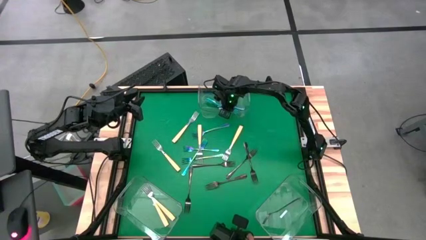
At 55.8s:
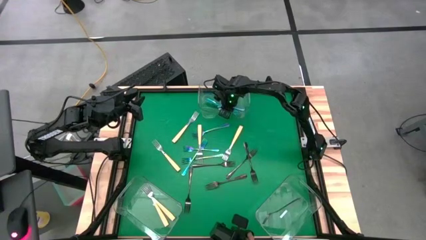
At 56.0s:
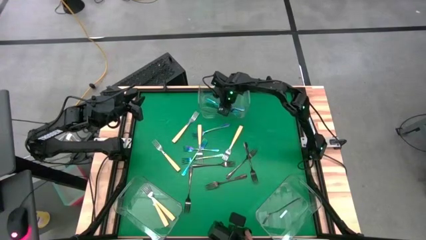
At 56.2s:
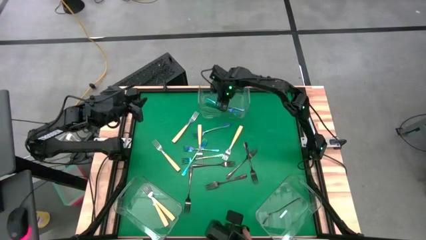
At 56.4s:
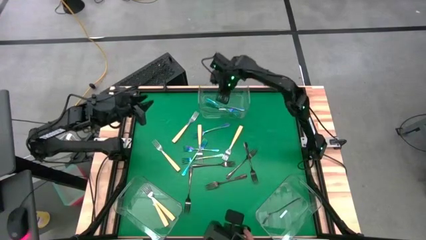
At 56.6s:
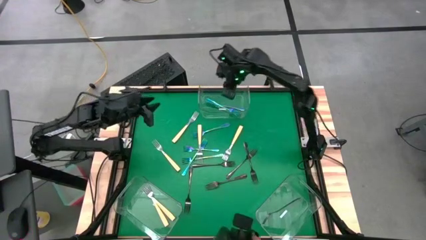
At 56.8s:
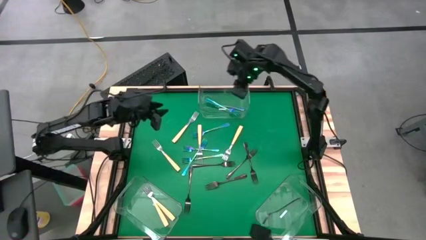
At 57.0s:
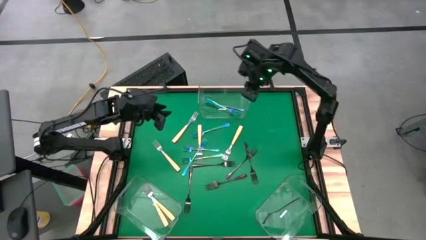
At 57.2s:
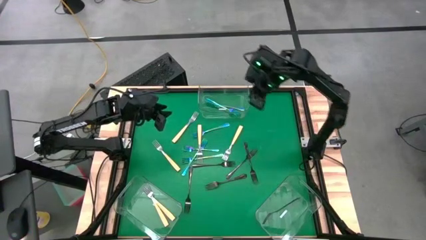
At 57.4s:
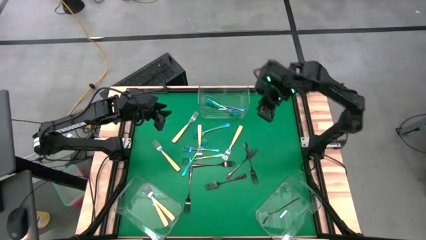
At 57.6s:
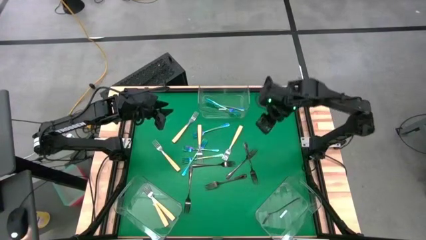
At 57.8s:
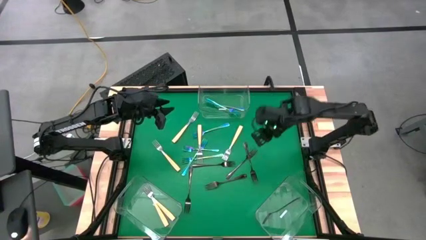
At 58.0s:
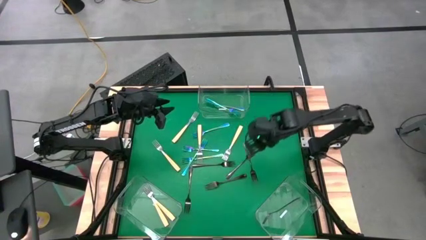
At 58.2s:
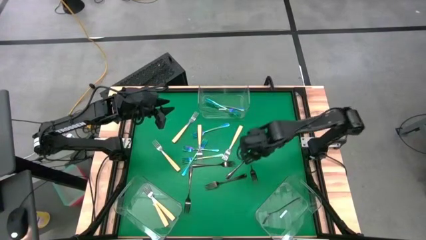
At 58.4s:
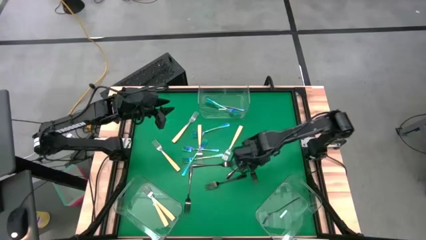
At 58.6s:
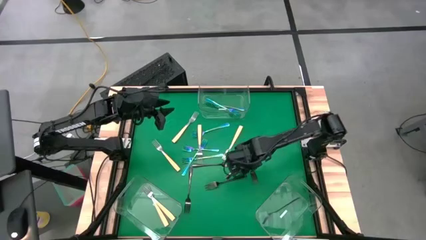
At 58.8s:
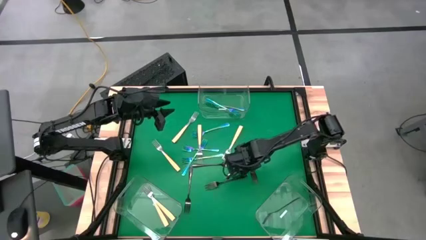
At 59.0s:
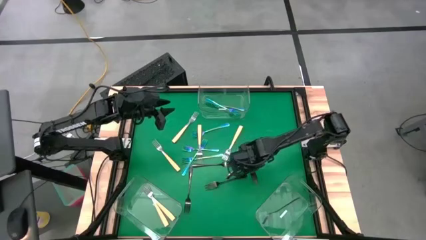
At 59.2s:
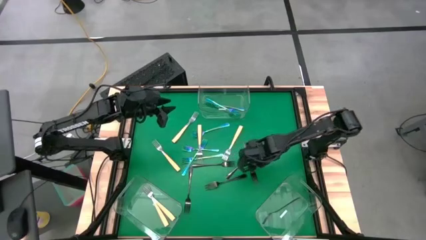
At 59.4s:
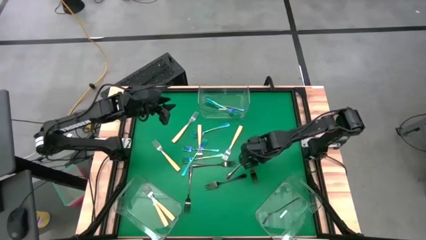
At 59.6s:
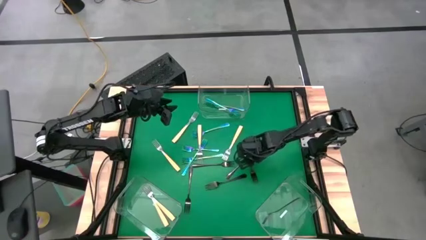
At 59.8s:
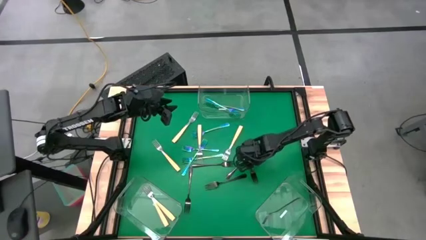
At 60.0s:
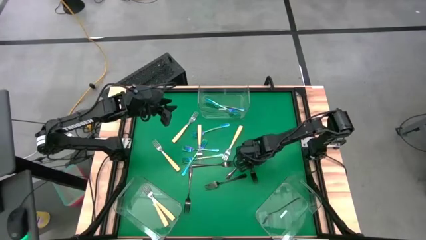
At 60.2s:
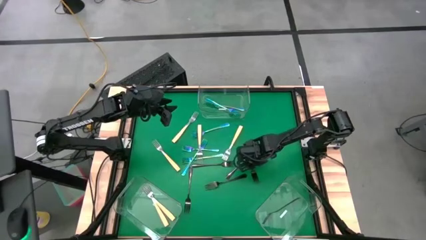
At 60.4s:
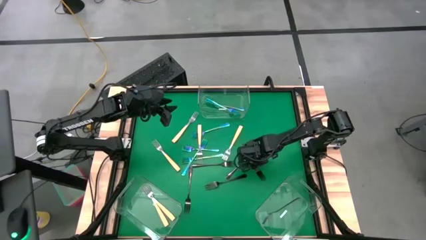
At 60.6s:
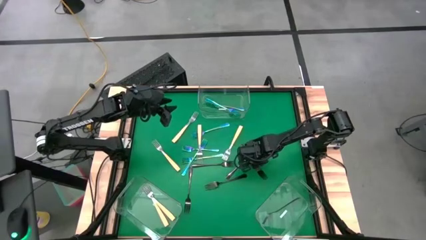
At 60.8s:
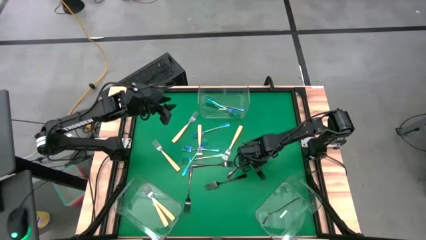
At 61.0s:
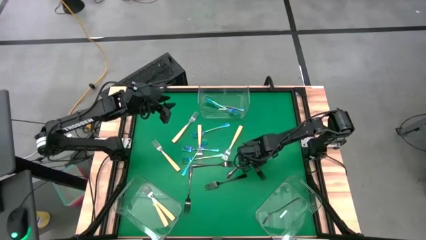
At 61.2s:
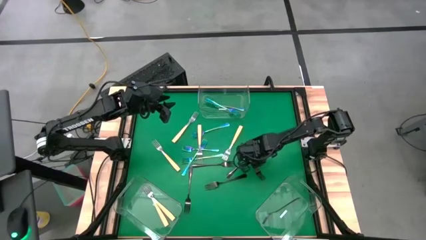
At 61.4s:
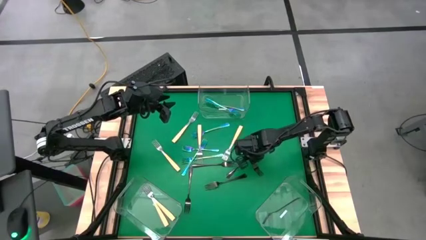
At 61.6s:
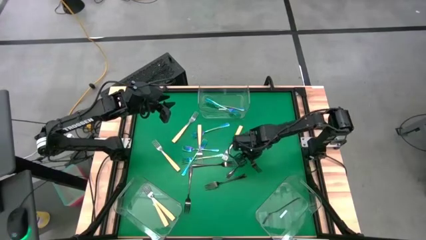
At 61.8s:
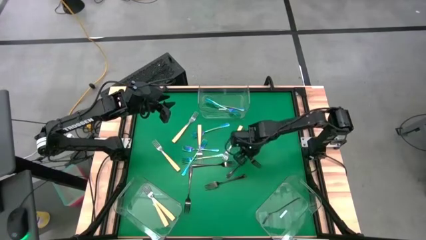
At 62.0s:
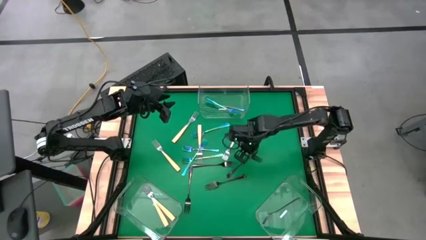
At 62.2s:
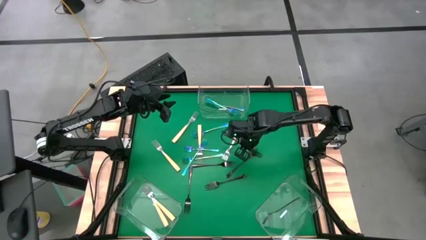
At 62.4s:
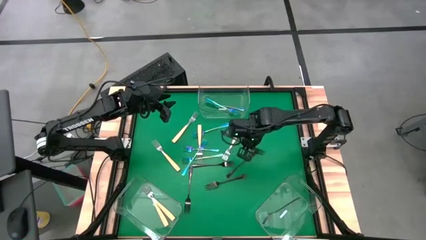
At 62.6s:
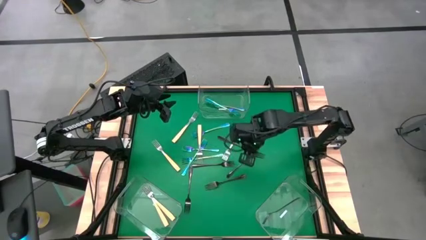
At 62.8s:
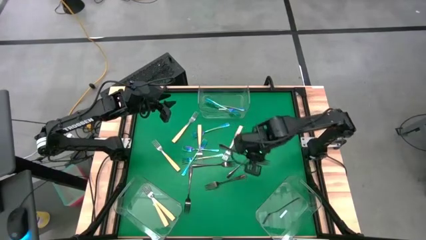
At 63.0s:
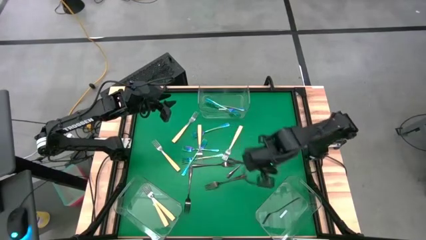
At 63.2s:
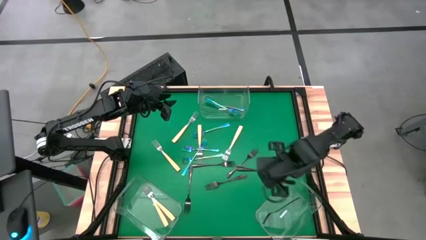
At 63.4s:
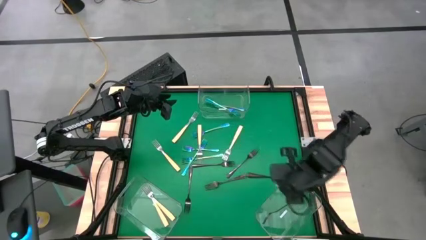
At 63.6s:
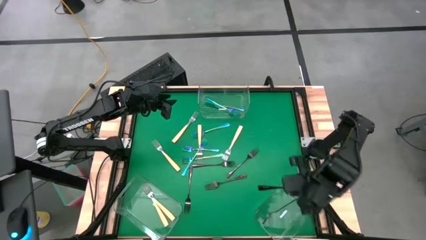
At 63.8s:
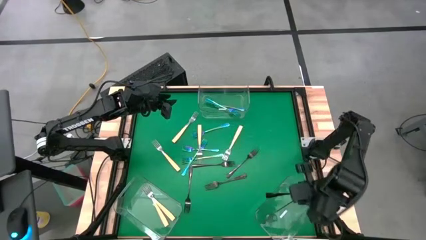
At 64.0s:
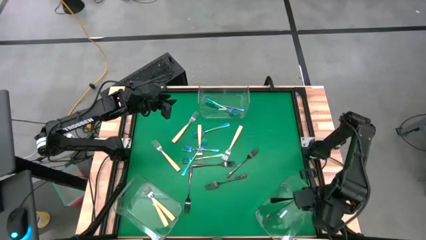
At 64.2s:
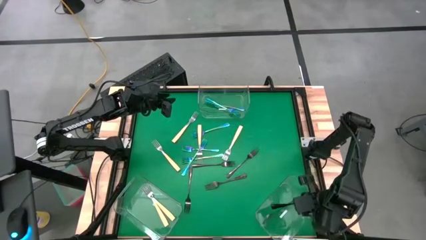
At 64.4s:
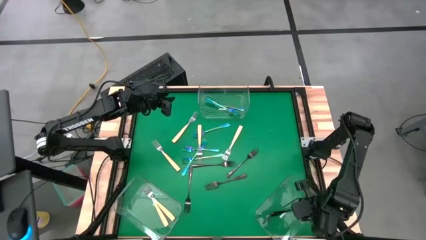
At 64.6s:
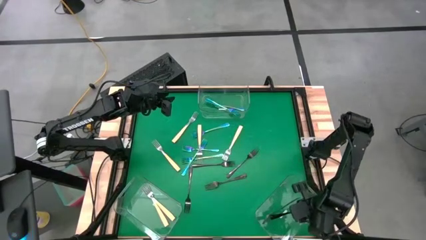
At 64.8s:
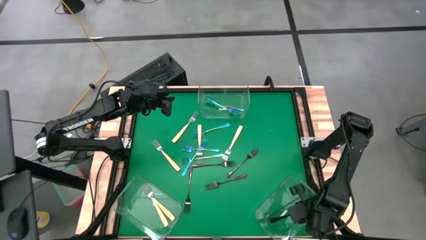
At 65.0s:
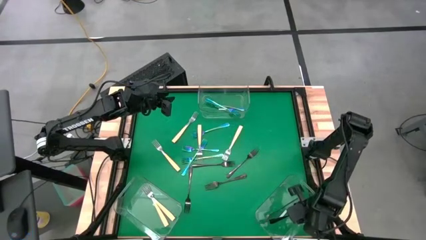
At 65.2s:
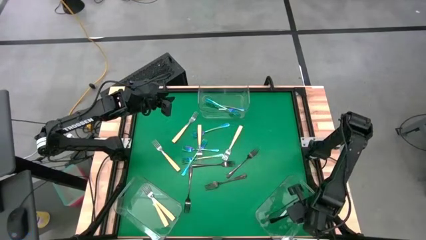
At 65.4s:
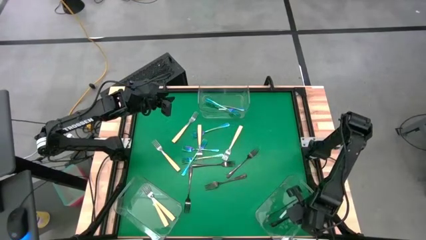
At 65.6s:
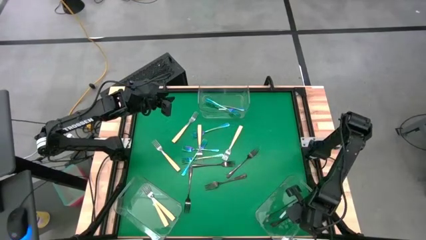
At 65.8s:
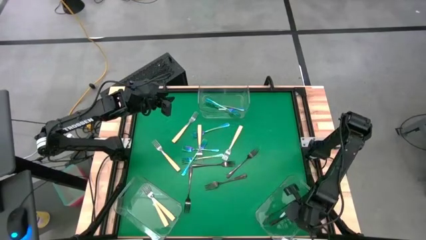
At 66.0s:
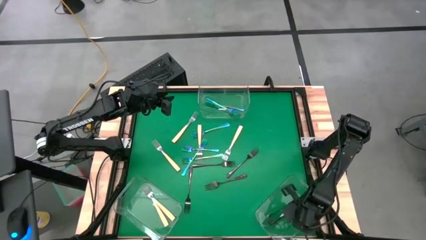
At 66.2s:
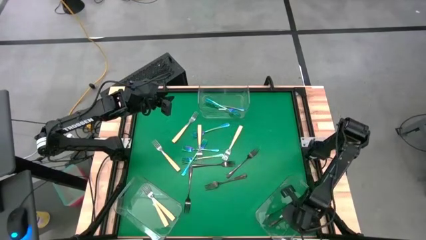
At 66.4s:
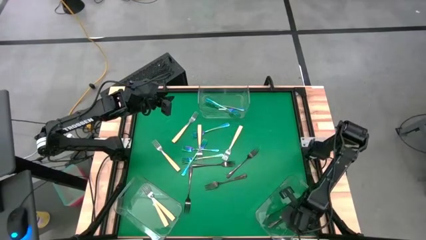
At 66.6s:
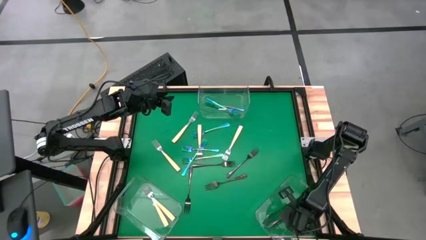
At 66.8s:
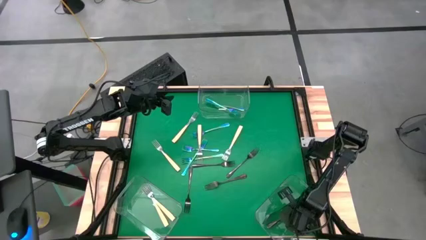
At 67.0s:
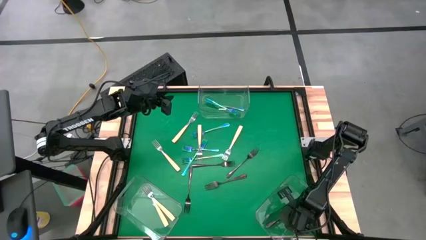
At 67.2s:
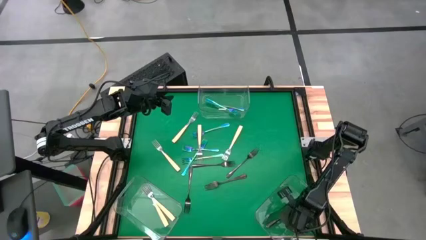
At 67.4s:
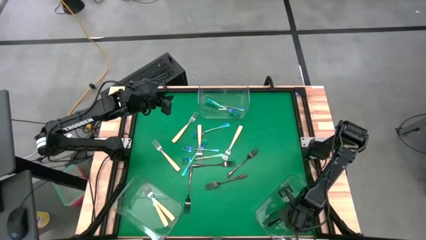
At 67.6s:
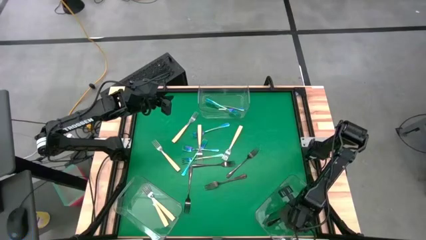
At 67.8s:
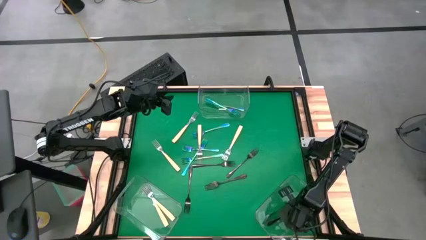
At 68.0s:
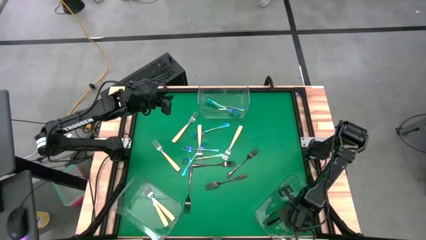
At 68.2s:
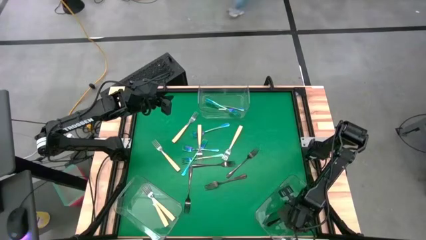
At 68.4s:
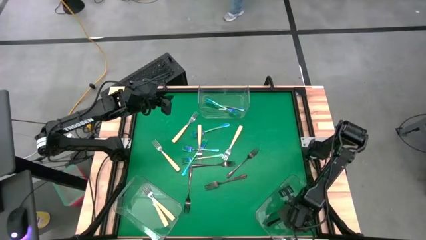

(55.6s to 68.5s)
Task: Sort silverware by color (type)
Put the black fork into the bottom right transparent bin

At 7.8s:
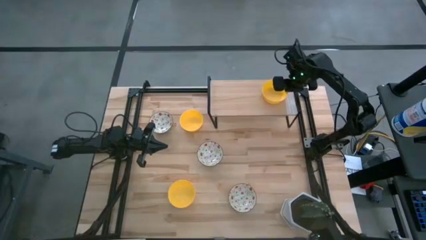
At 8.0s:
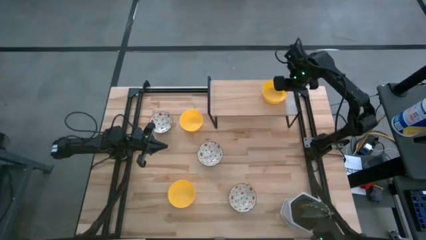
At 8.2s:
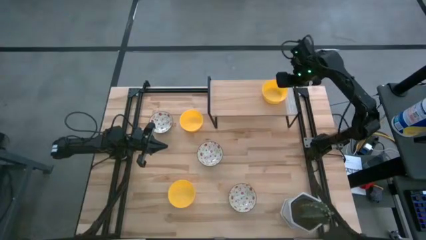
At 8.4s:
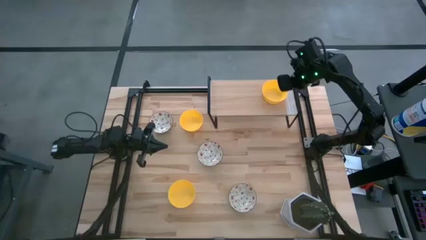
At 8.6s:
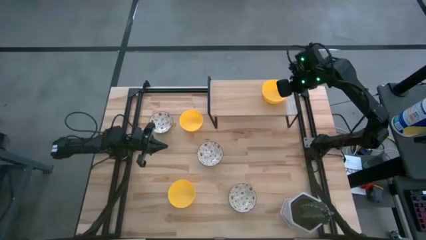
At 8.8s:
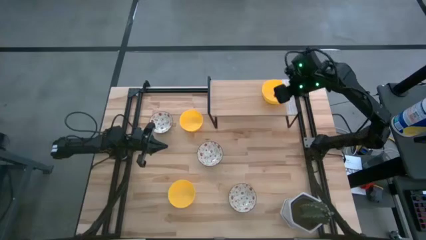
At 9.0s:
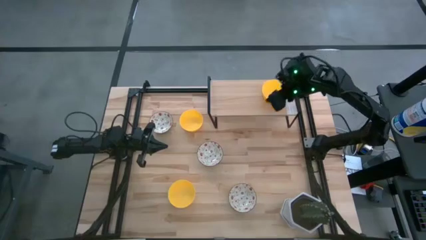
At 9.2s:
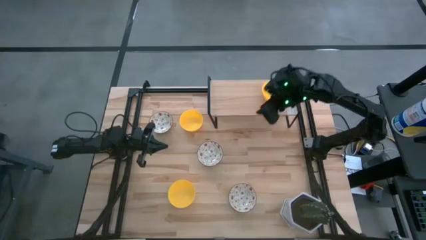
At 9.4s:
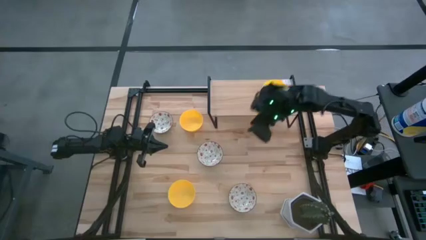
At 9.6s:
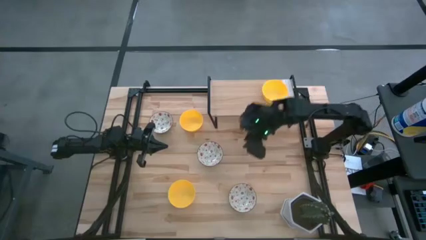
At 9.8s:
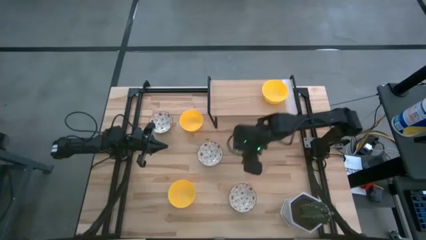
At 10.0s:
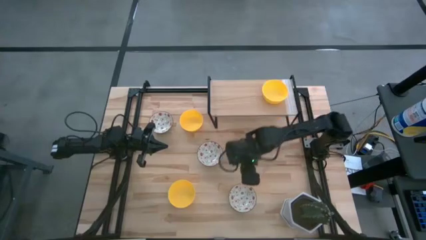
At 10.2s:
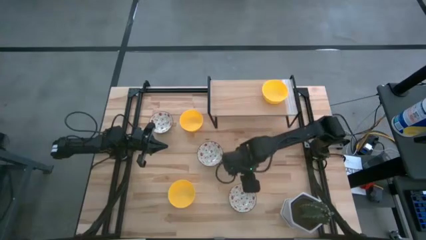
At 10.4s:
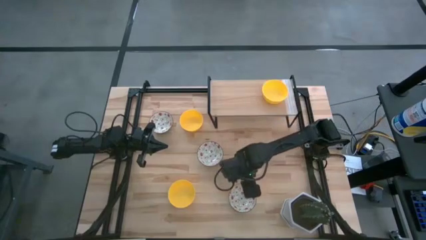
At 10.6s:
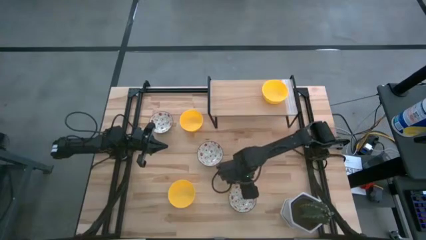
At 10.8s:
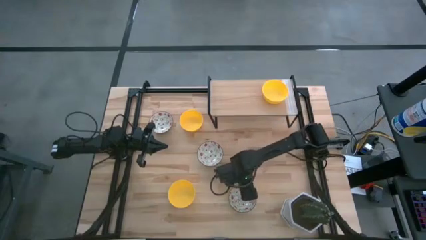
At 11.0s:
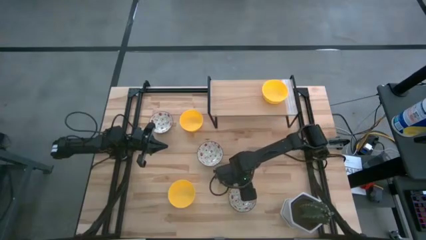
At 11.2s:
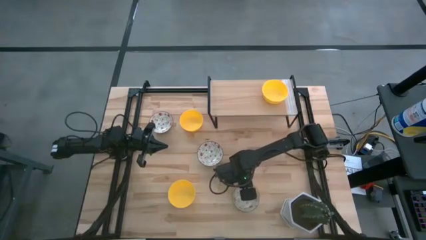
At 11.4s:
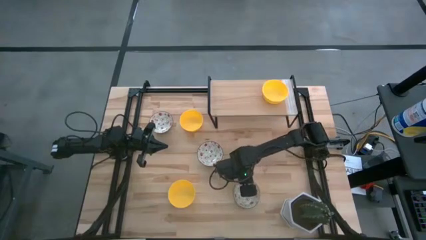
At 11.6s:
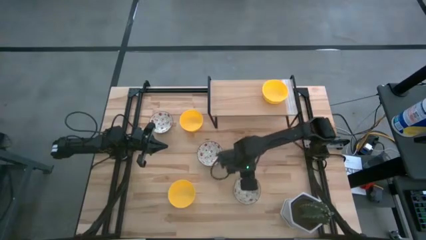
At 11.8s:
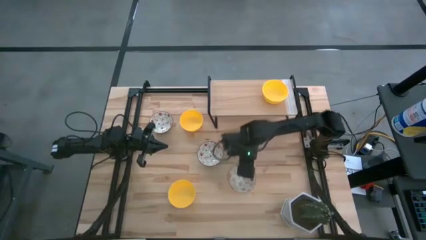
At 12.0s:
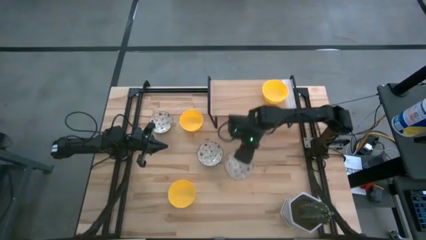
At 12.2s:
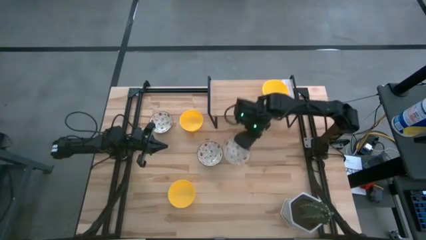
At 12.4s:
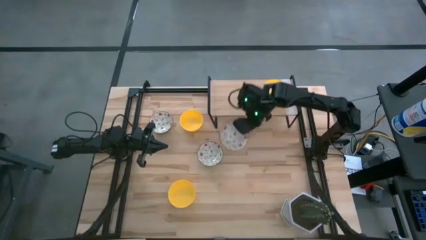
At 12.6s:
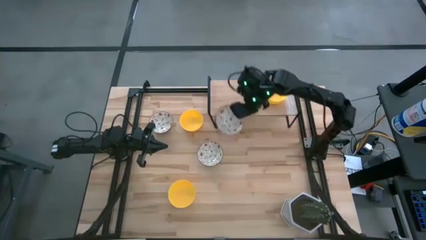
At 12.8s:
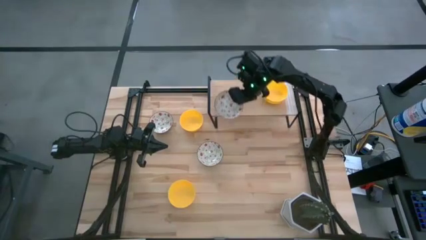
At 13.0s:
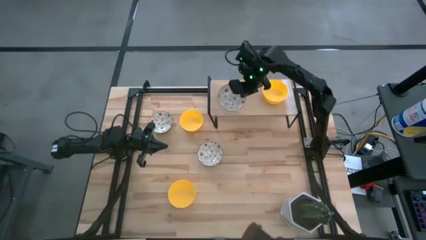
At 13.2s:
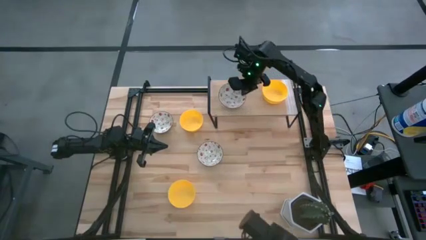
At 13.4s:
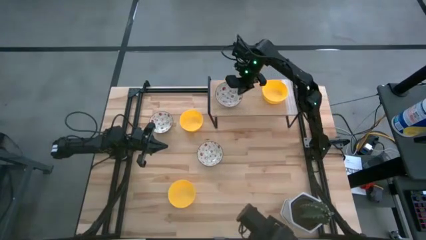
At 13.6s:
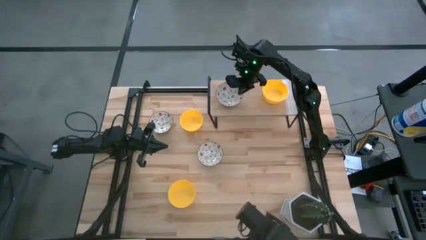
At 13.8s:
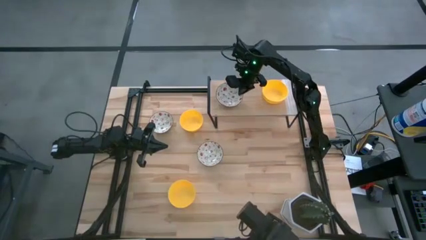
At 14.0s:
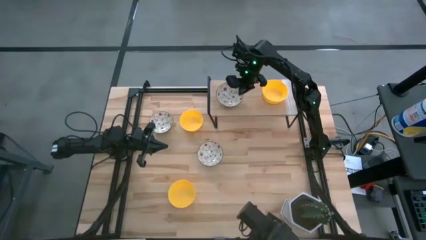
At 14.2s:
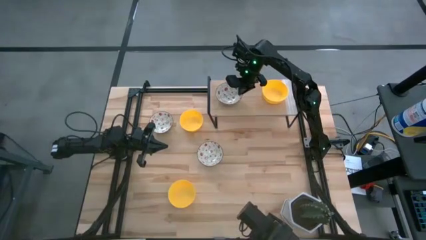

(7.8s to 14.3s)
Task: Pick & Place Mini bowls
Put the bottom right green patterned bowl on the shelf
